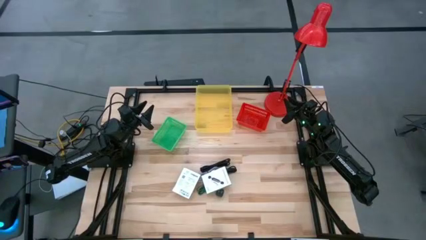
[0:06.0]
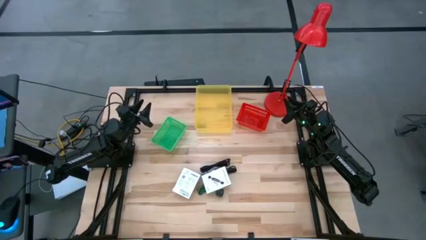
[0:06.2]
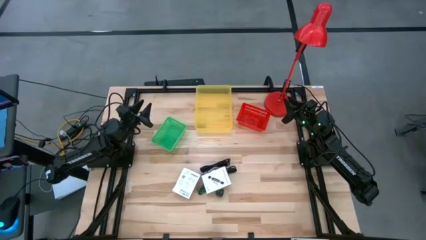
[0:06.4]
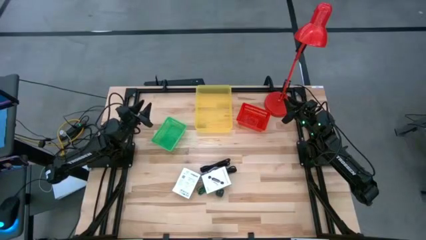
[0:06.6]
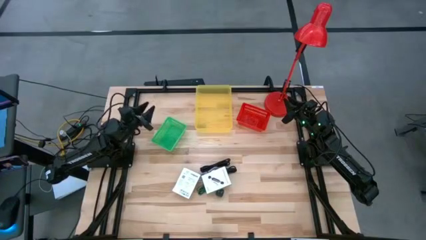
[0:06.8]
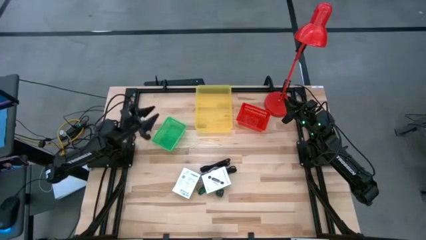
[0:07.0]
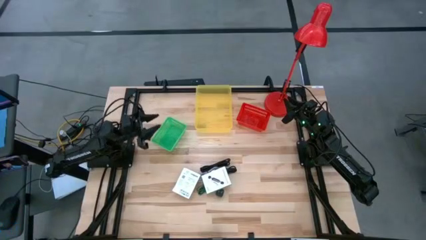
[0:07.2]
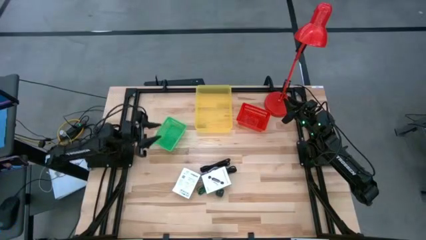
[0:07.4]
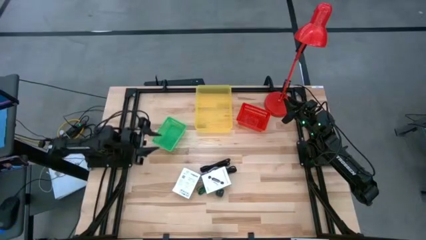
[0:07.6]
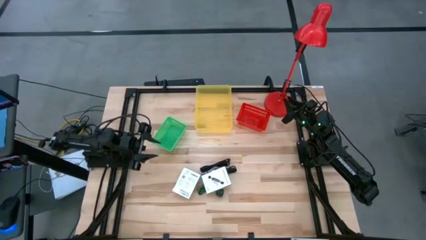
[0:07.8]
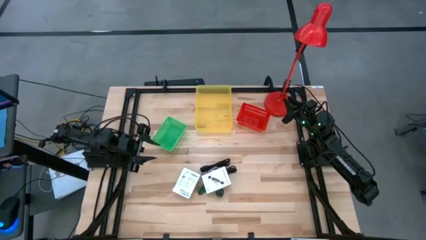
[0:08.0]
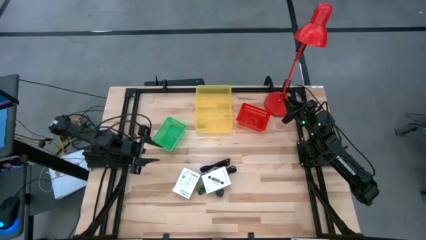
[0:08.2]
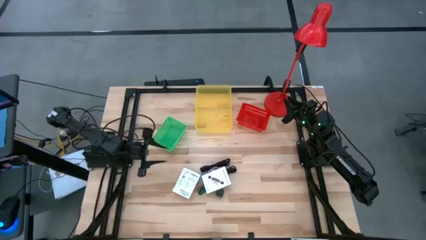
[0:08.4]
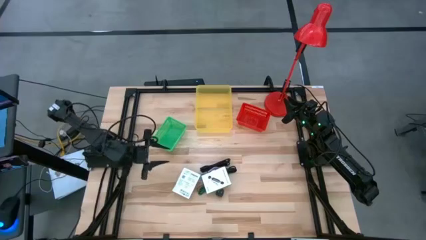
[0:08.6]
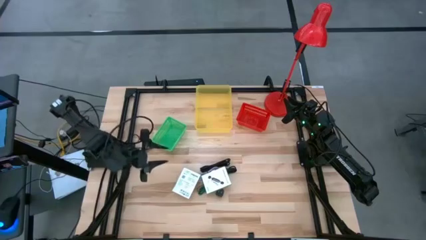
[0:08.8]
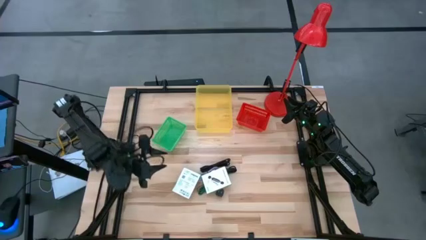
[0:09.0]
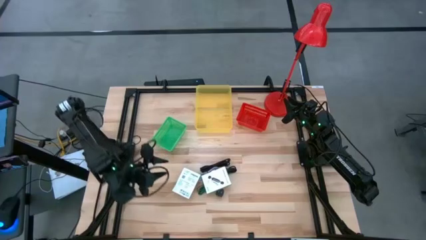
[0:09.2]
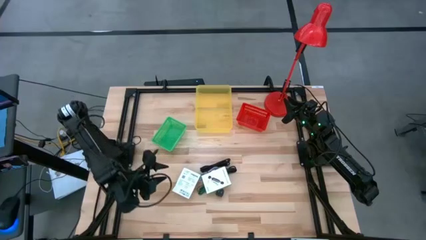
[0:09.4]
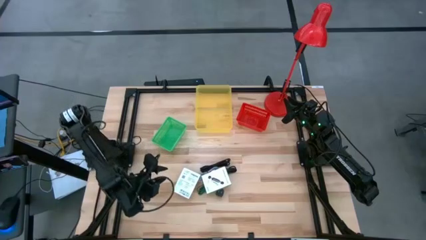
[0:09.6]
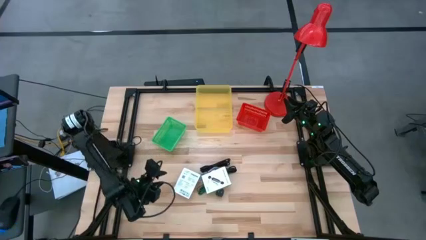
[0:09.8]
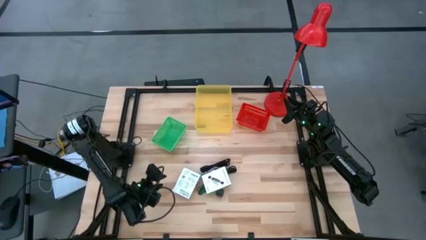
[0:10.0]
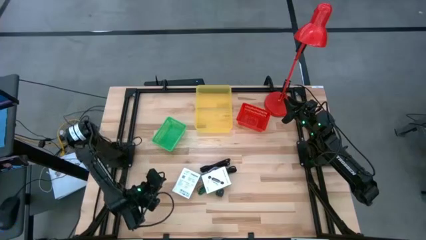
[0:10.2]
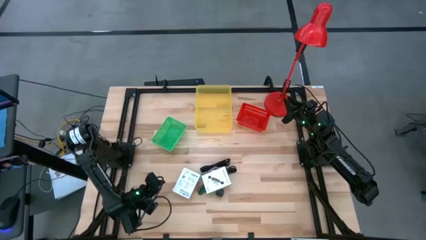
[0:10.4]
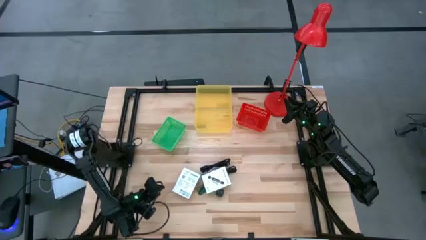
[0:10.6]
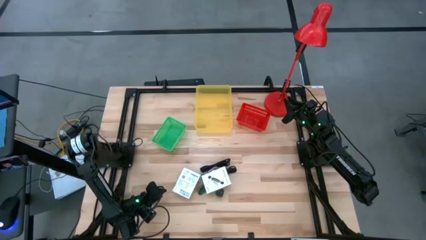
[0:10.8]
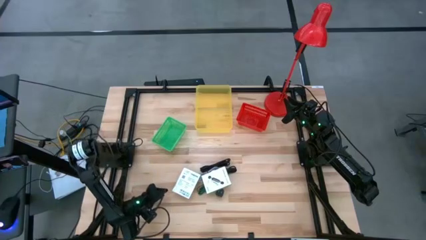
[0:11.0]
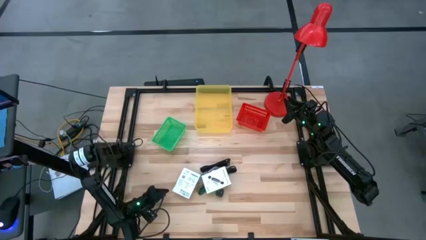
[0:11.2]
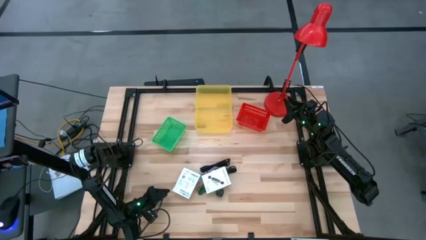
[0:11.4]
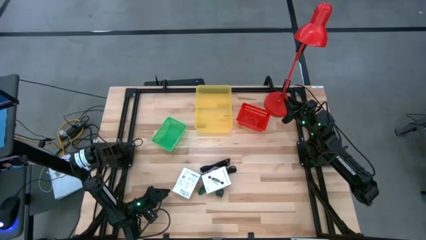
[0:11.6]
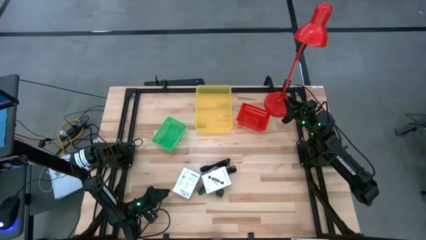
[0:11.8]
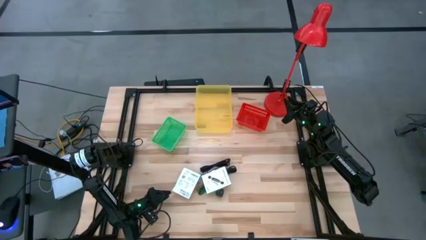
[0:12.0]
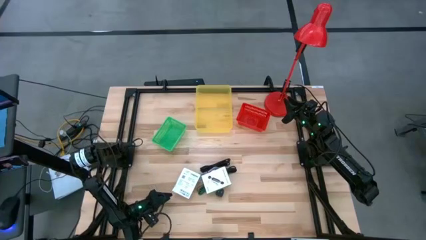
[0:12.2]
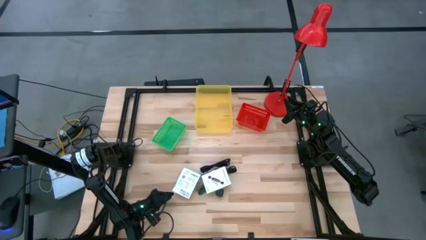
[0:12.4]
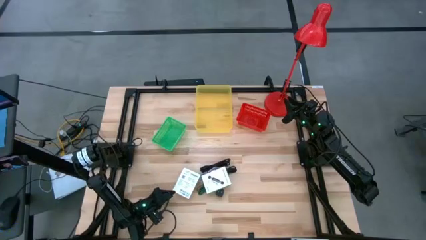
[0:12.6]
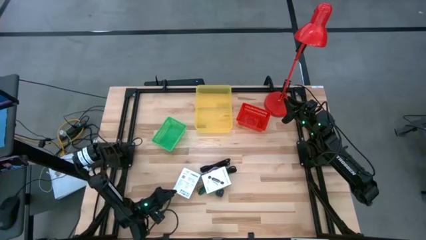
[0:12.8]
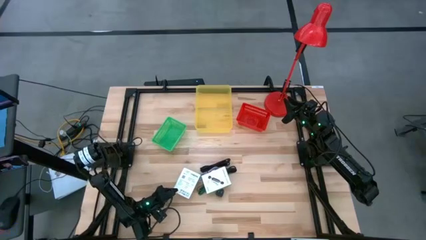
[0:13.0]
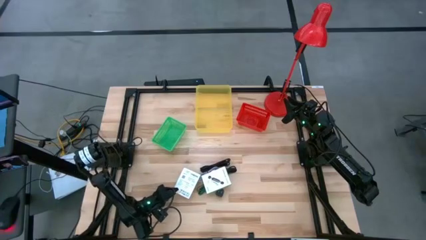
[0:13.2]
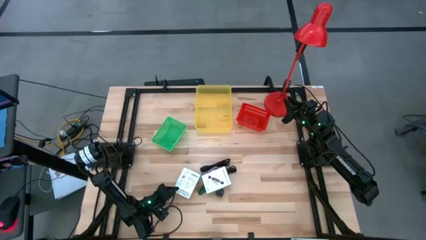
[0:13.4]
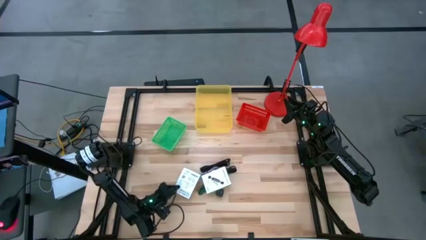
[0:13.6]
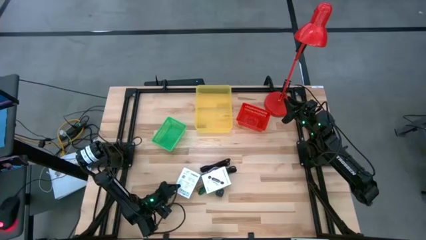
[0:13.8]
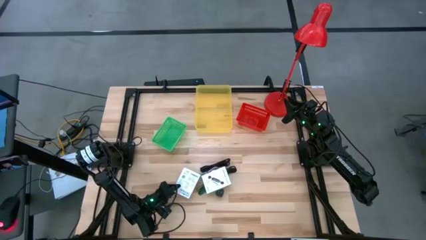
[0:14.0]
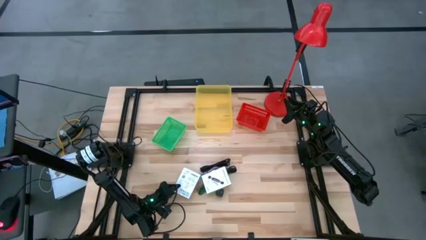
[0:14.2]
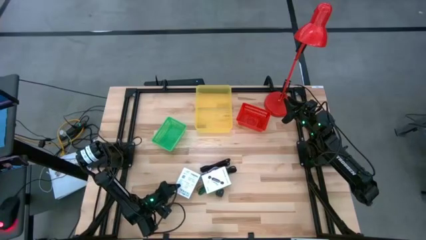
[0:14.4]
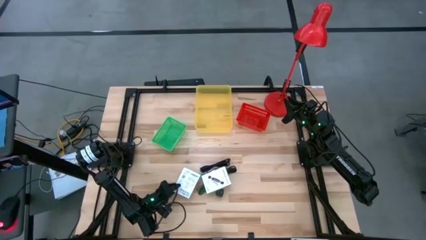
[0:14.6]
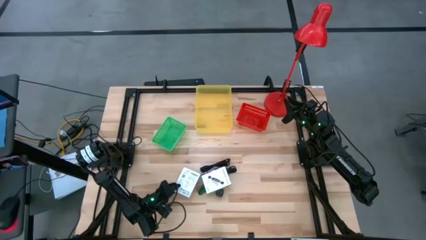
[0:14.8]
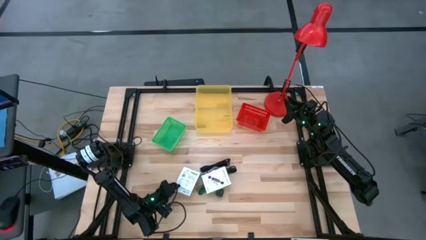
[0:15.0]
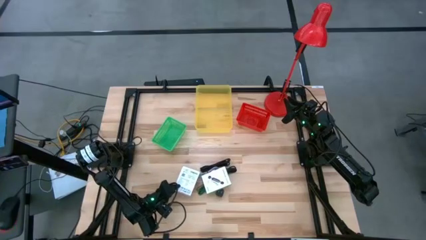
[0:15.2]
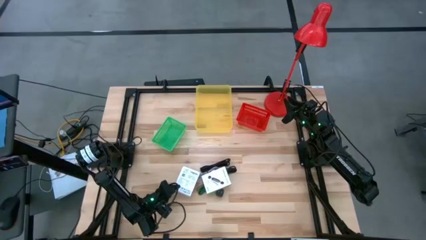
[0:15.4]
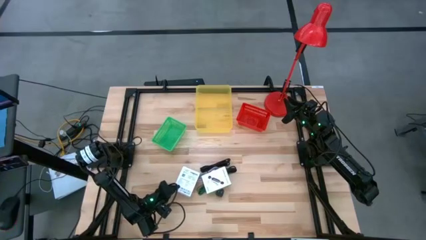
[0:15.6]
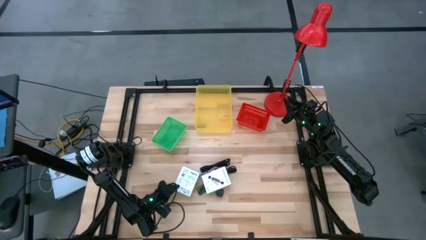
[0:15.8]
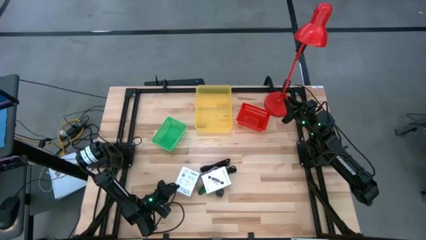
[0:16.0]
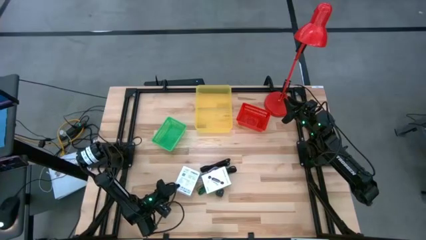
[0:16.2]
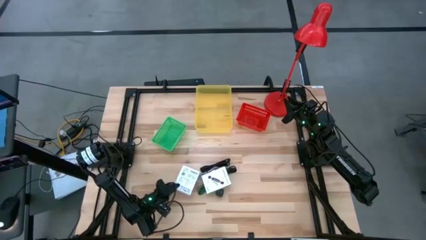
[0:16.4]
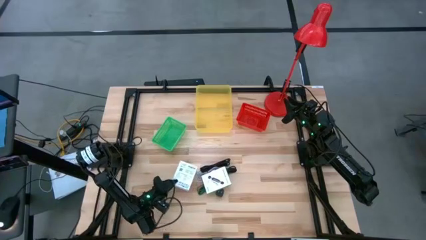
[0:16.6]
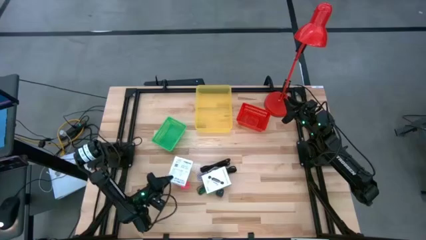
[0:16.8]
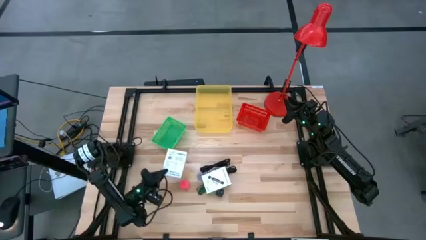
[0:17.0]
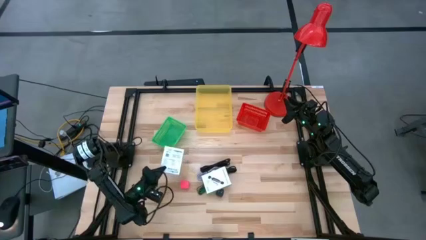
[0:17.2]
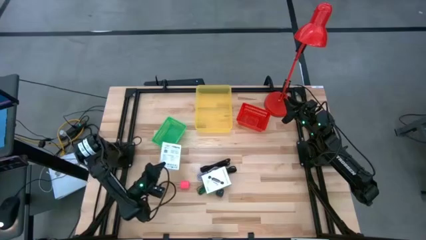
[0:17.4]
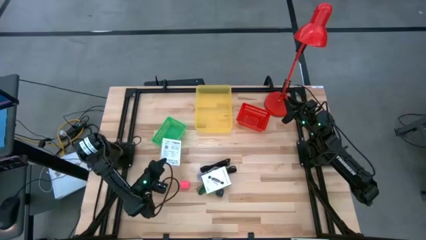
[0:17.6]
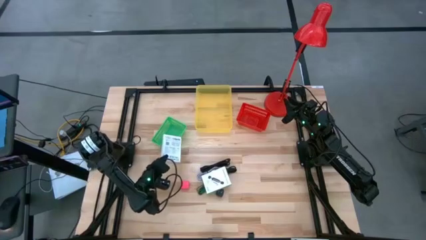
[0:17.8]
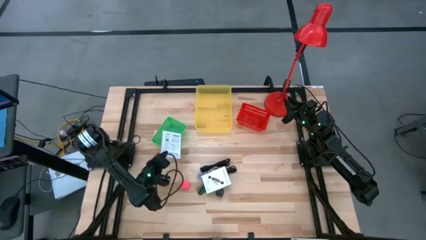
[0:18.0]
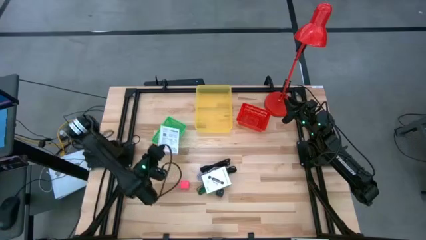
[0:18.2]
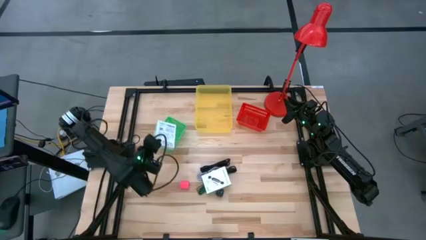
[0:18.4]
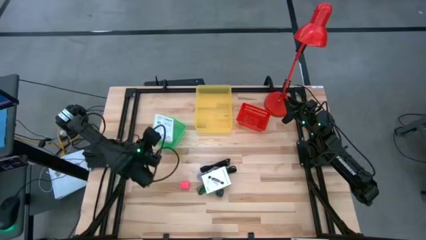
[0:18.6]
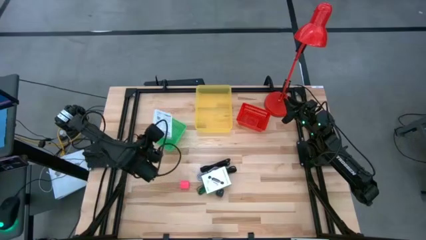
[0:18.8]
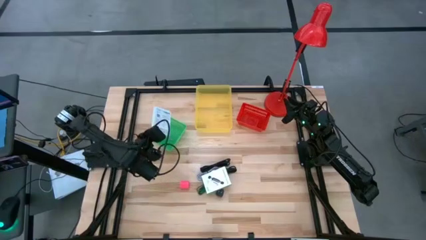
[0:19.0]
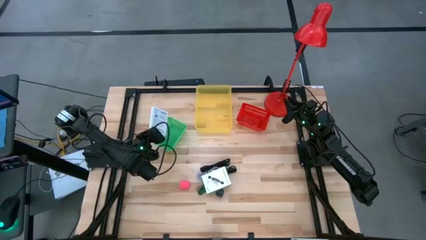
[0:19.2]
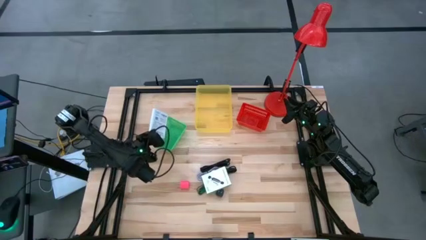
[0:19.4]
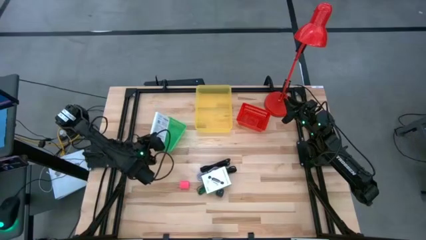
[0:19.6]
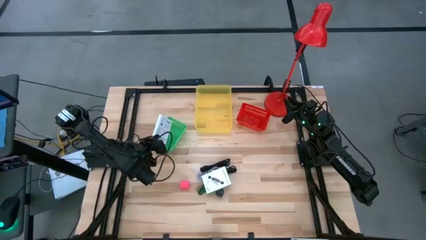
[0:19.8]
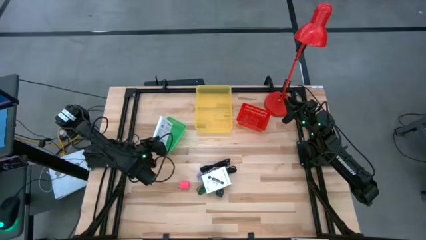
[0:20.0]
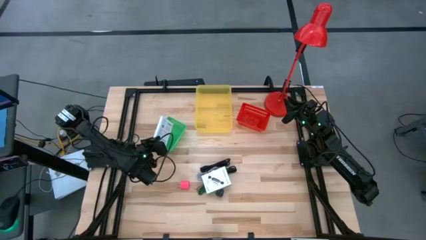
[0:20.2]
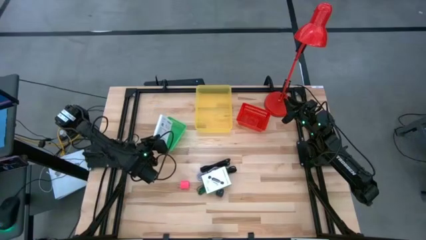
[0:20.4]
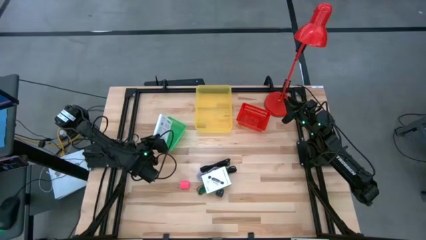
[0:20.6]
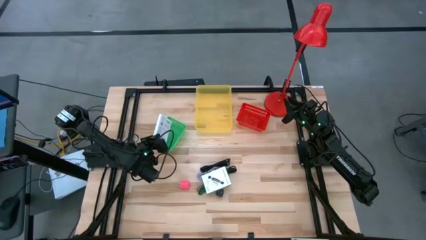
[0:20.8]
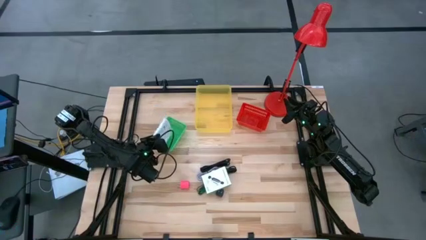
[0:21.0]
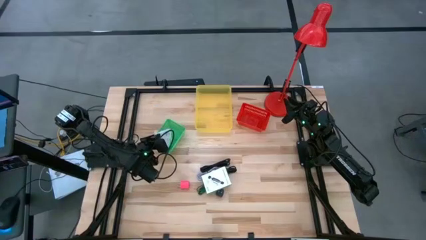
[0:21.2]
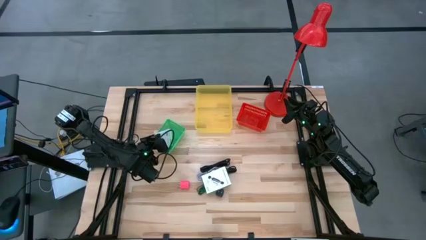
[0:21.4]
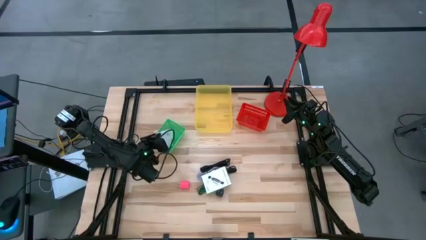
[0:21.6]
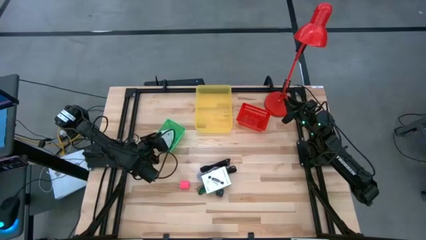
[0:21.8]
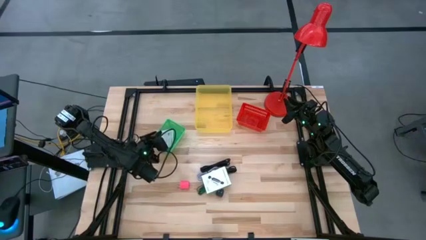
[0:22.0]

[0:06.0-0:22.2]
Task: Pick and place items into bin
Put the left white box into the green basket
